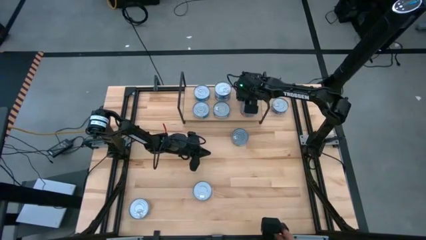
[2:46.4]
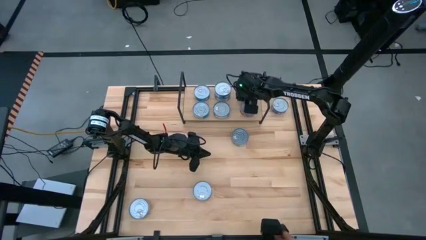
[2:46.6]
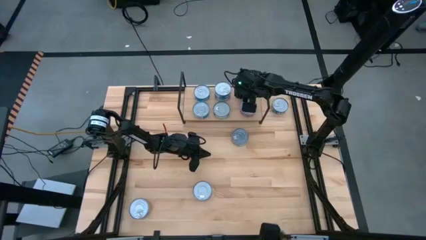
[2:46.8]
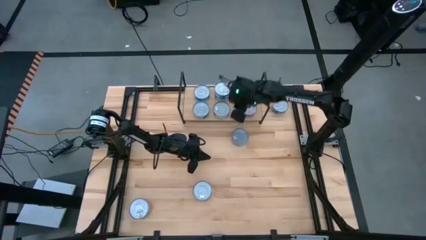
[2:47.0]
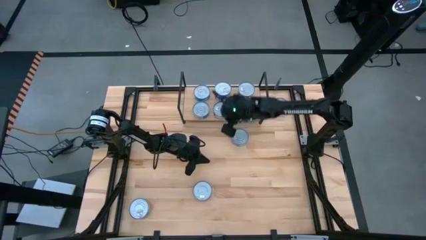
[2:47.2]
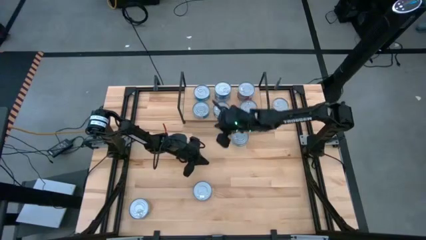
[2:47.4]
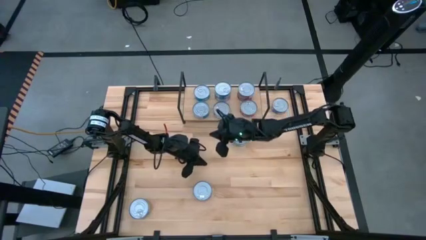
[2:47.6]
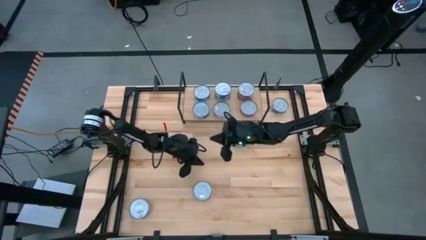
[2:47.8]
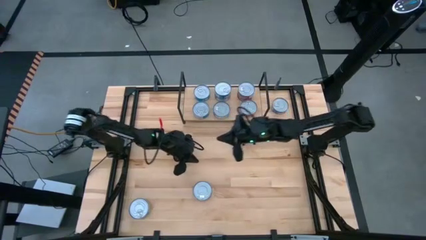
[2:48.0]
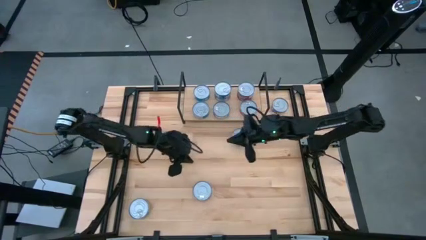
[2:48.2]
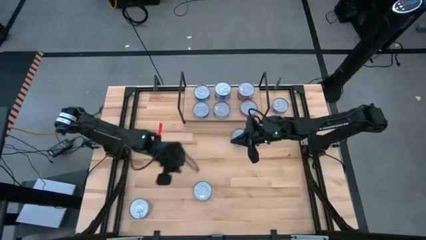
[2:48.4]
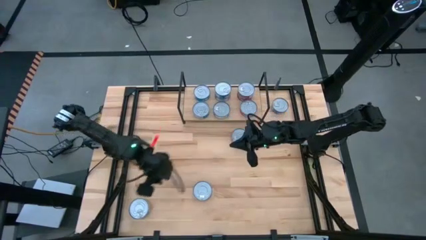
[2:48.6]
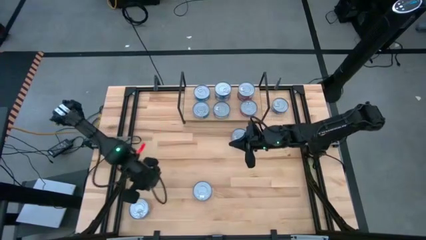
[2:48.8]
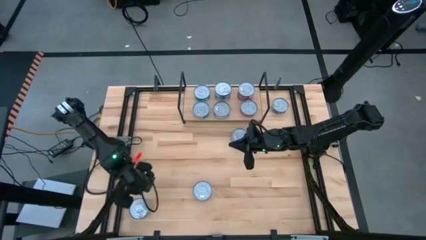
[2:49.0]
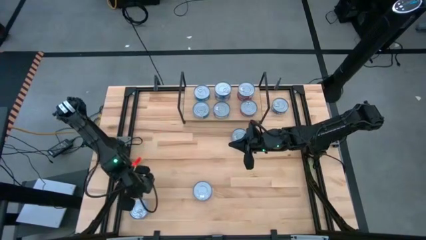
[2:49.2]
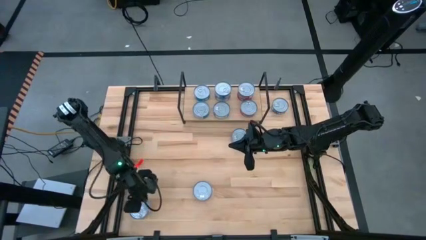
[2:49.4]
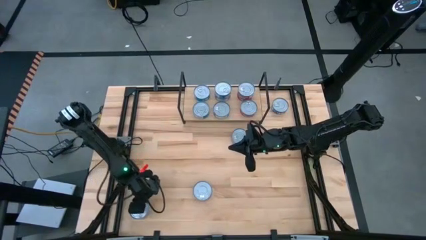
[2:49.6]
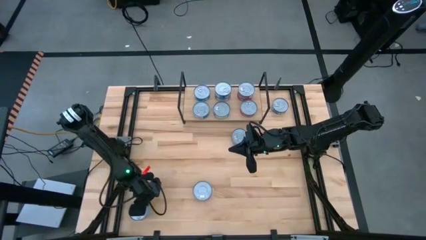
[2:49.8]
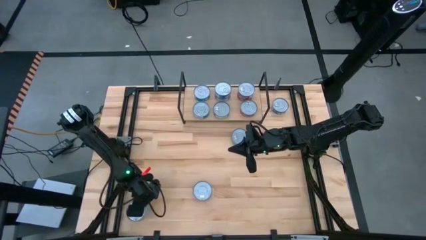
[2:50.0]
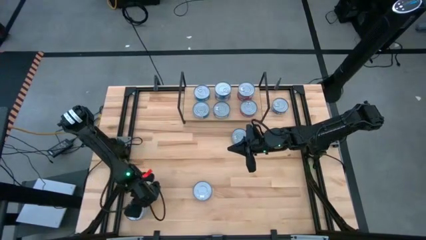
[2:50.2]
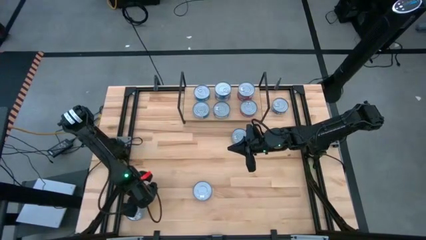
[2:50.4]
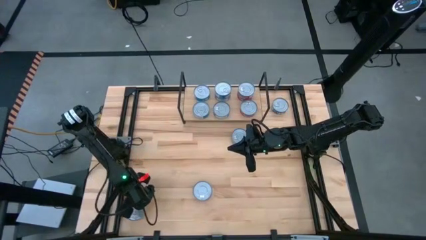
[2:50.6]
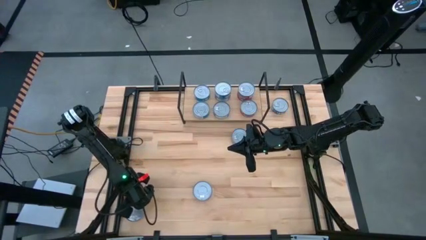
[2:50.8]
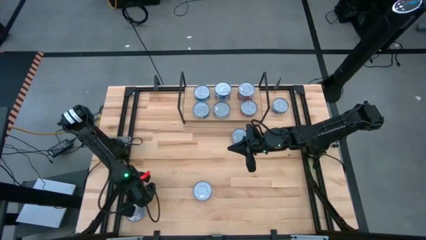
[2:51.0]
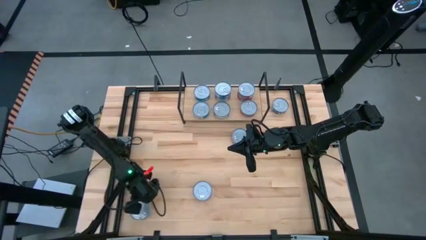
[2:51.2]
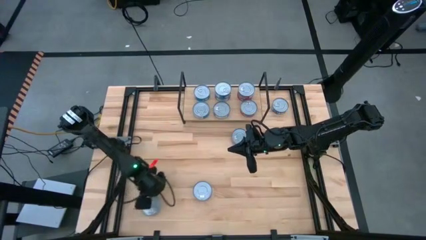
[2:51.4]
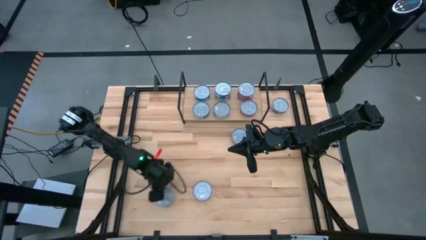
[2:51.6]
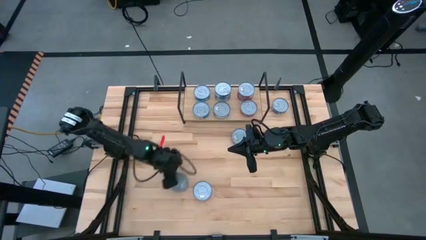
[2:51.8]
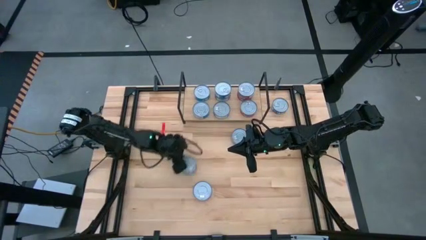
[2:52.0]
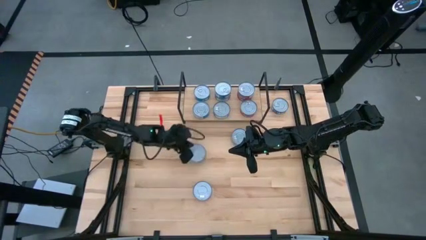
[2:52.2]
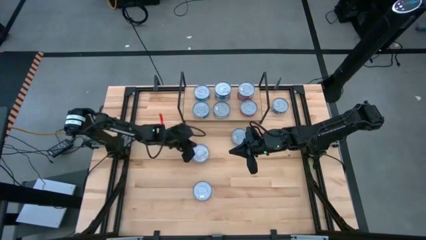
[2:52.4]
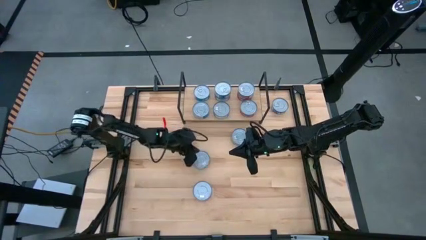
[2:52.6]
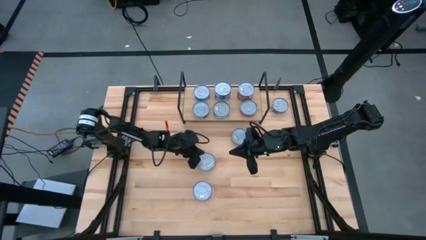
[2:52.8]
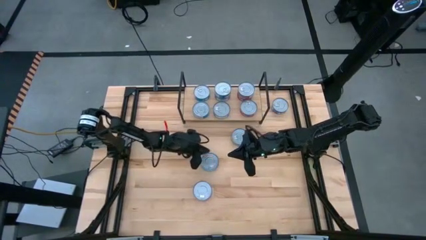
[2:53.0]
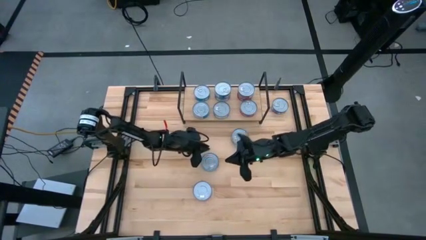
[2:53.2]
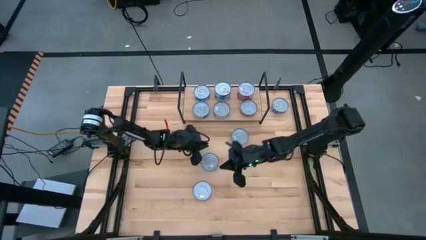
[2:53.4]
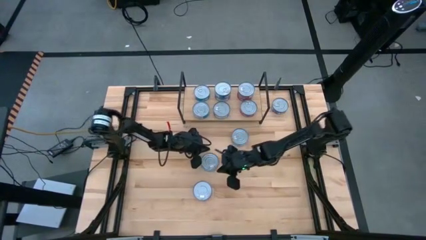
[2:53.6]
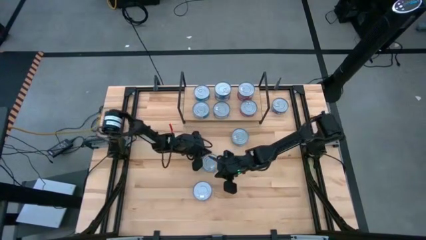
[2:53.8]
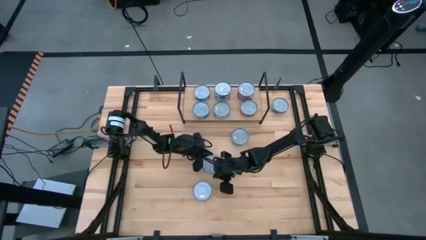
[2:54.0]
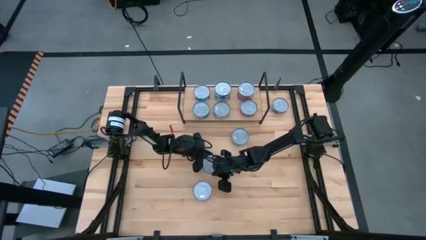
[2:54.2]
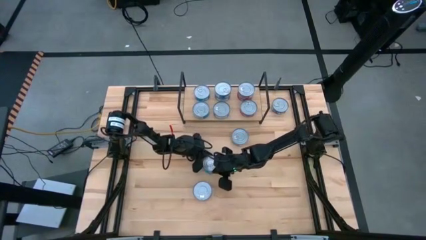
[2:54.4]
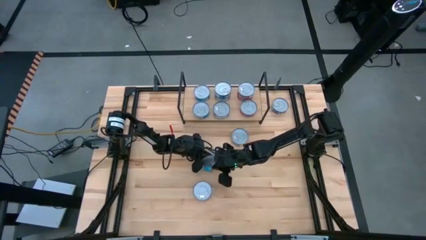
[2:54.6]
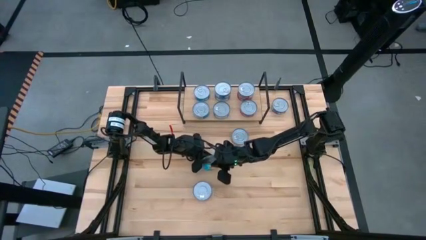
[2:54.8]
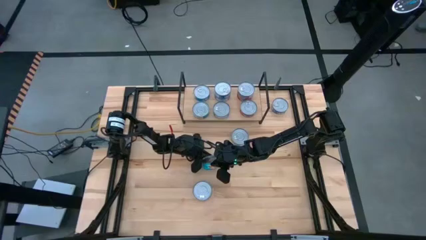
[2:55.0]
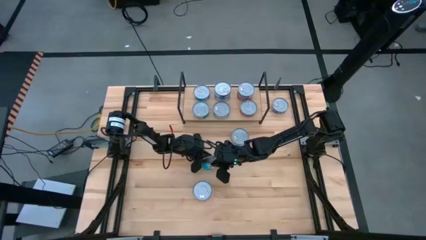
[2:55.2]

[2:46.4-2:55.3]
Task: Stack canned seafood by type on shelf
Stack the yellow-blue tuna can on top of the yellow-blue tuna can on the shelf

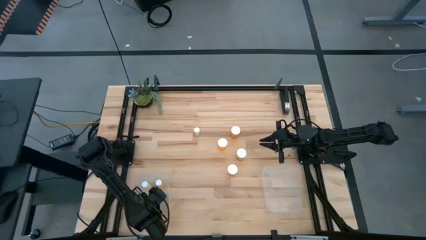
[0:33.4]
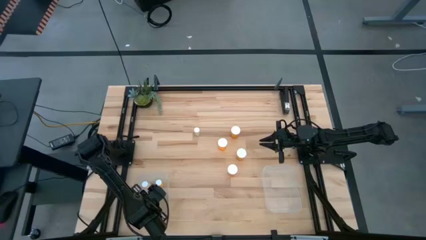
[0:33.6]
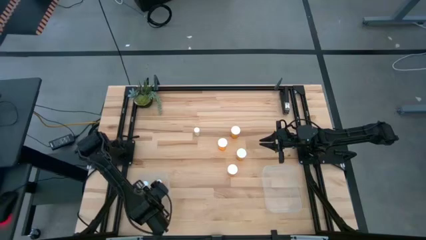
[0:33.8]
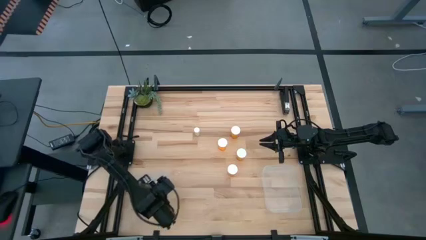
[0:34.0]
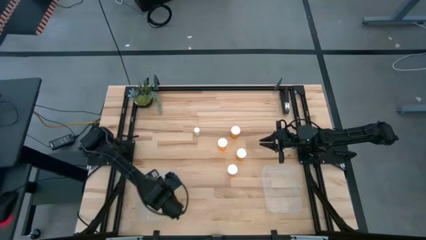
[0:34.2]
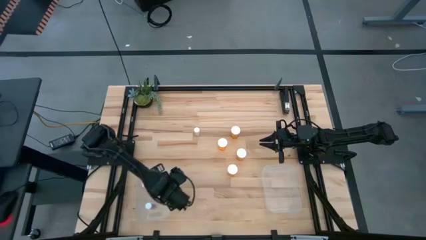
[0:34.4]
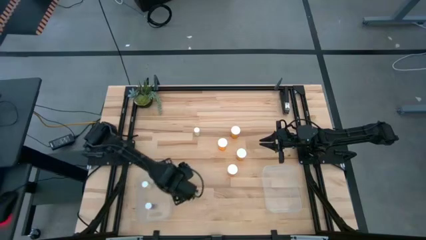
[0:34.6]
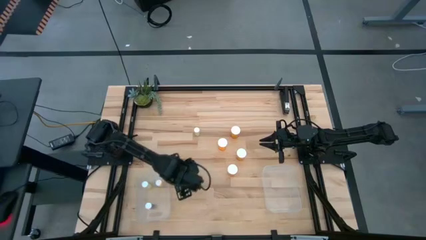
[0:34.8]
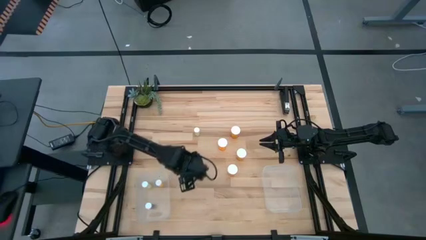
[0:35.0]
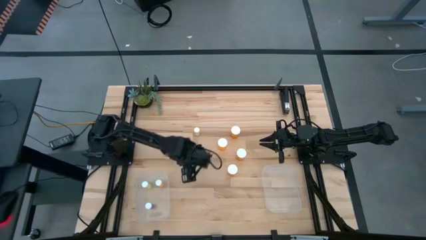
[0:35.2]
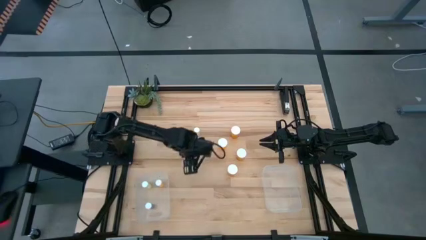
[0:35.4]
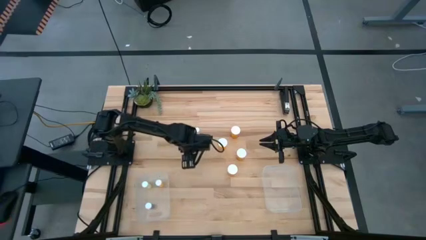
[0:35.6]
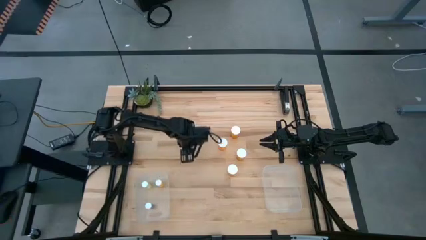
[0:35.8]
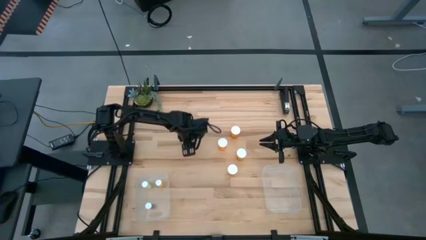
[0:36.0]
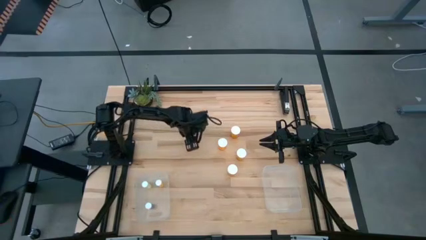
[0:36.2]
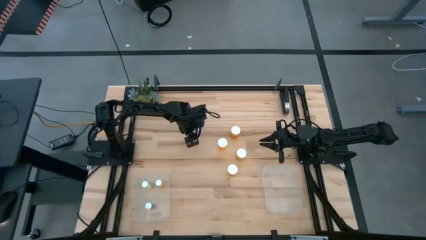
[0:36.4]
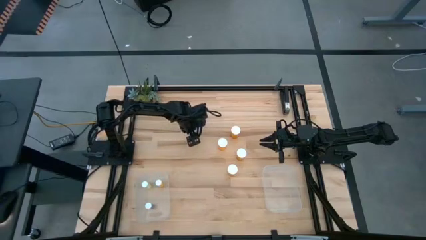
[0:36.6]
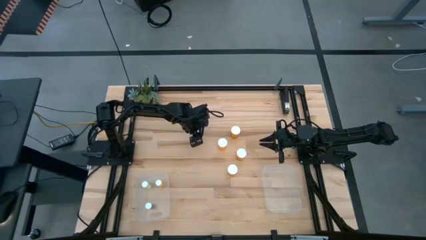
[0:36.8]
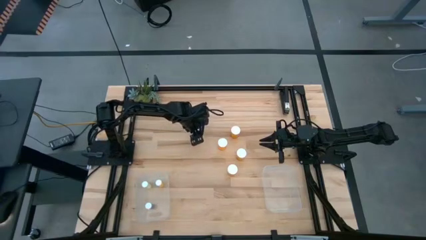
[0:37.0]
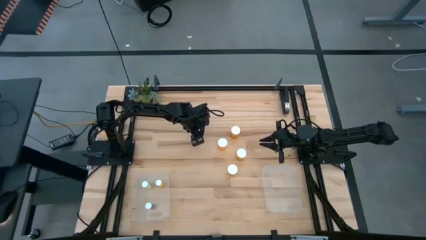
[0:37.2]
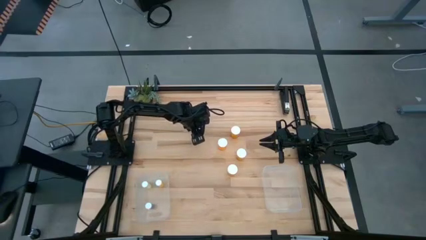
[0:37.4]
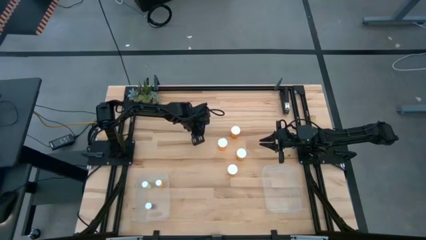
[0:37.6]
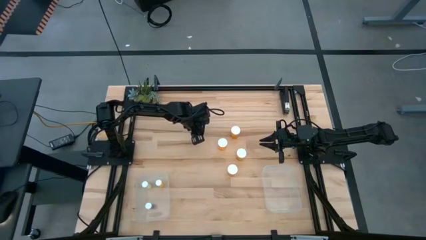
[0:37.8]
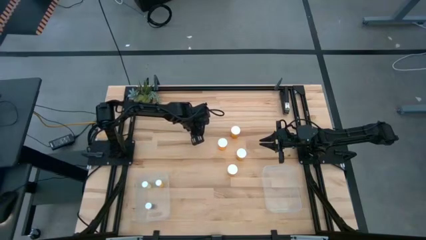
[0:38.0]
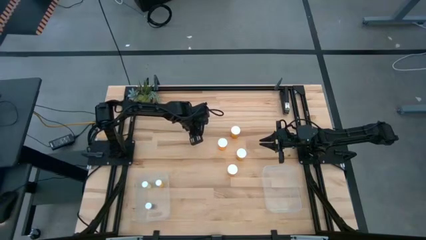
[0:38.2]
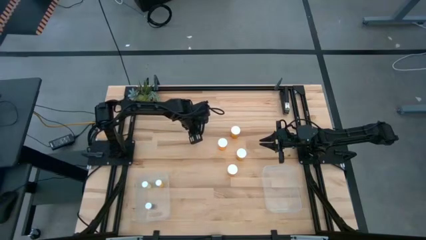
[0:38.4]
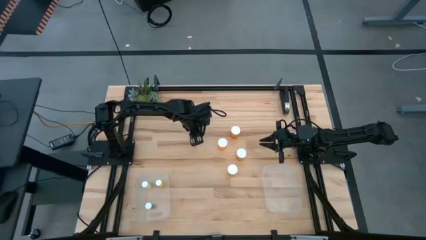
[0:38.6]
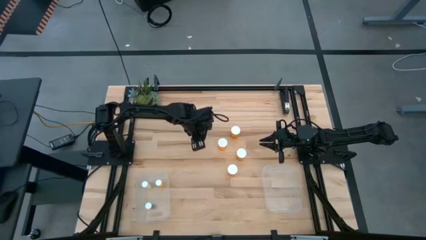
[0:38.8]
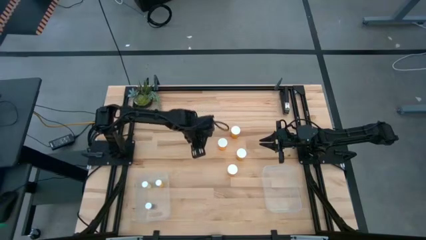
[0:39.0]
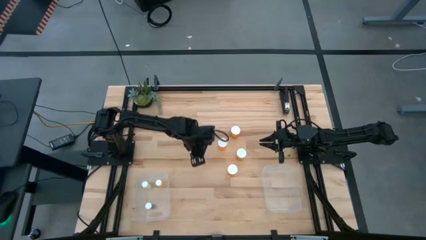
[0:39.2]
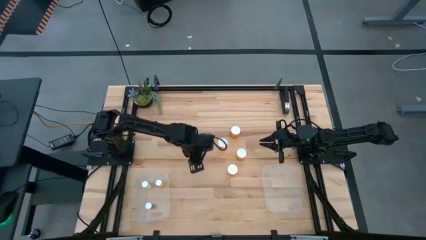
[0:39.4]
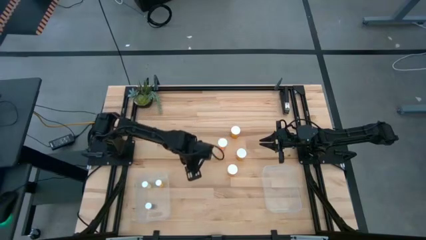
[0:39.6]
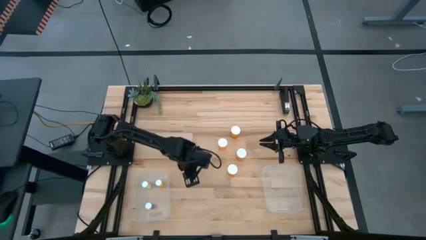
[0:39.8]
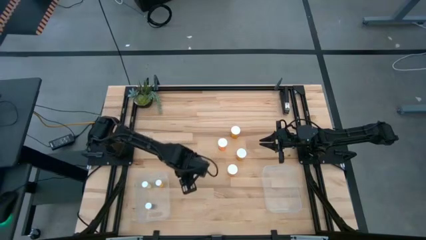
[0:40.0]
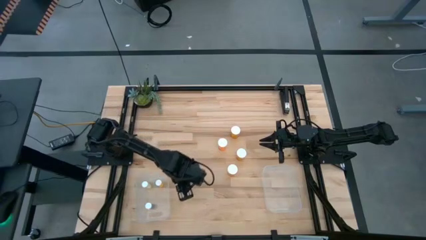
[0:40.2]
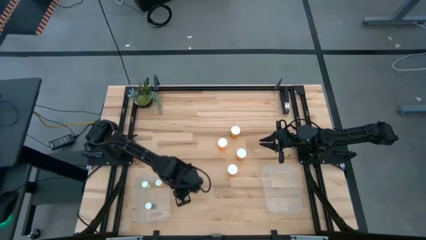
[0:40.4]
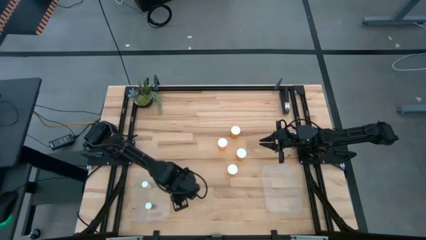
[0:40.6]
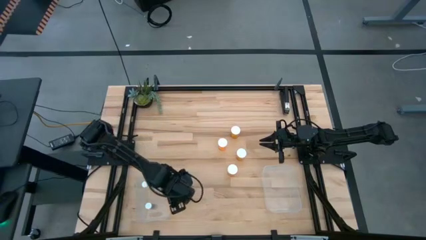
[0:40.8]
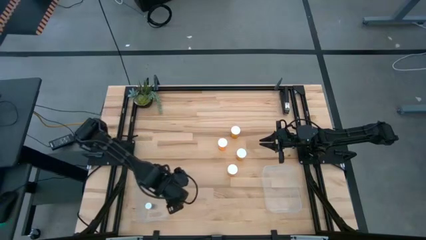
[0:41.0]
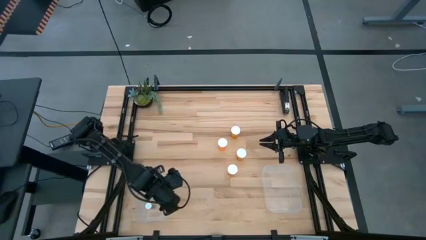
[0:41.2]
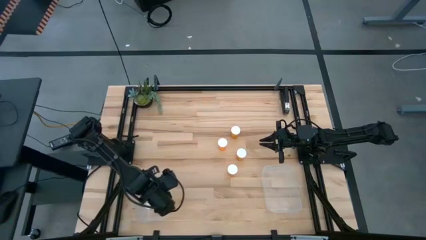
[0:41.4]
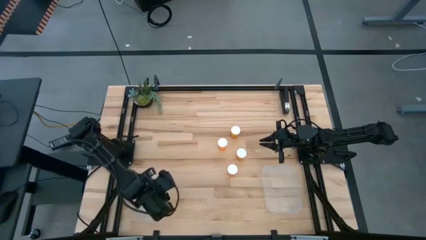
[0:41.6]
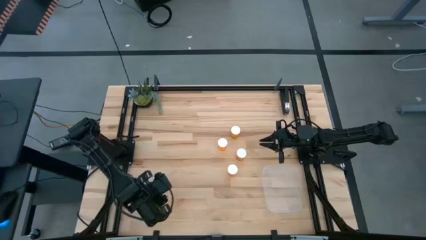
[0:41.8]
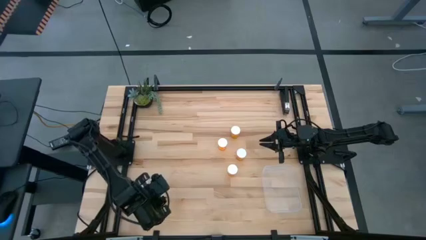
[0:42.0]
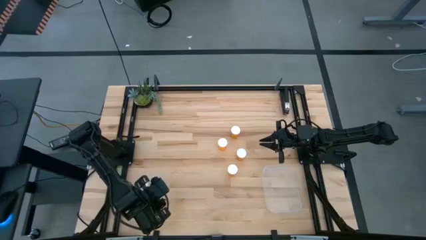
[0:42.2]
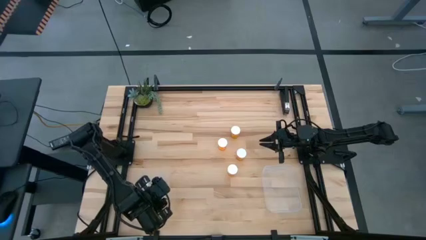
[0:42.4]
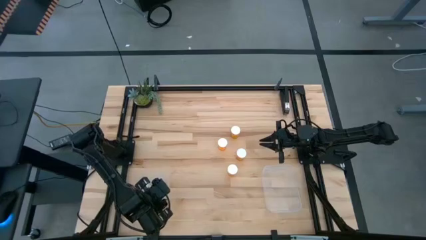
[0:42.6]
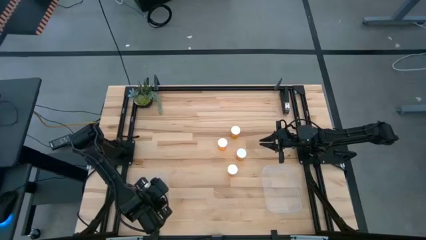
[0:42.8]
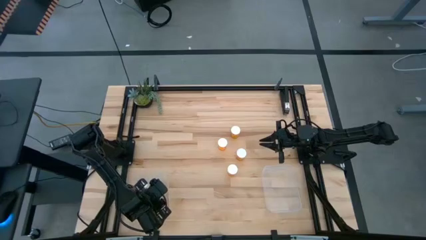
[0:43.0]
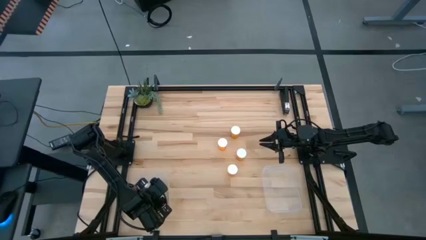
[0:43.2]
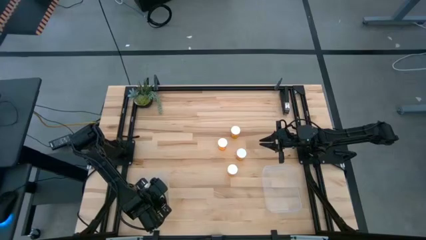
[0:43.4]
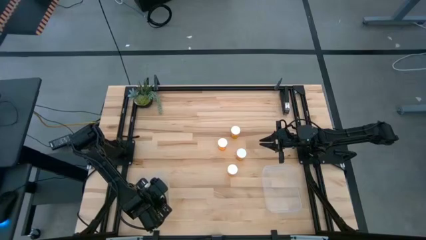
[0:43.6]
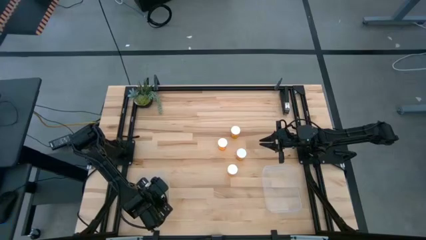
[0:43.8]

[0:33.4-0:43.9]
Task: Pick and place medicine bottles into bin by pill shape (circle, oval)
Put the small yellow pill bottle into the left transparent bin
